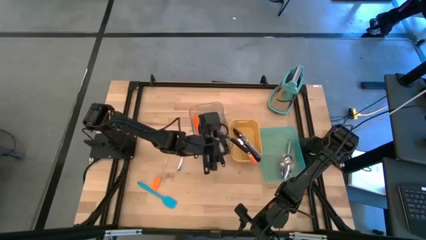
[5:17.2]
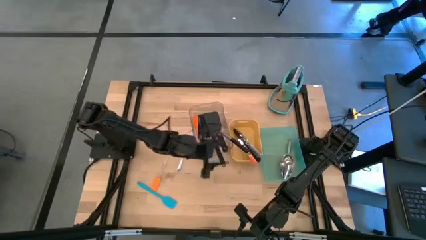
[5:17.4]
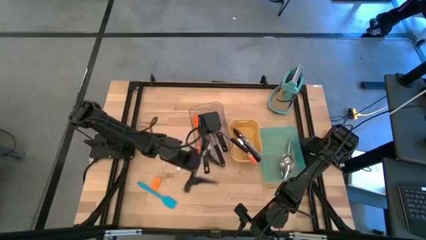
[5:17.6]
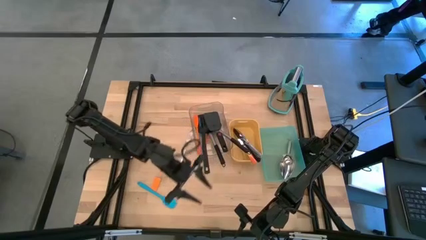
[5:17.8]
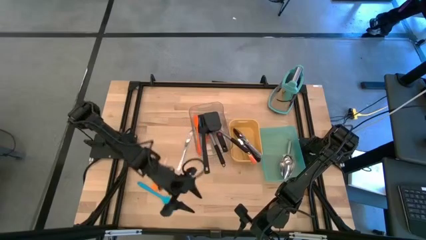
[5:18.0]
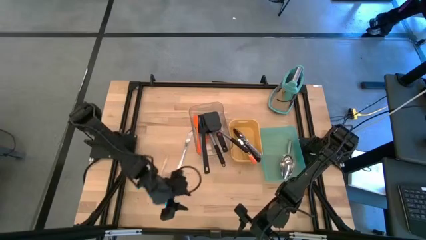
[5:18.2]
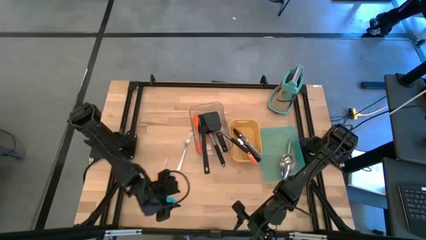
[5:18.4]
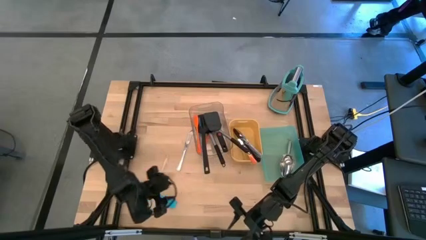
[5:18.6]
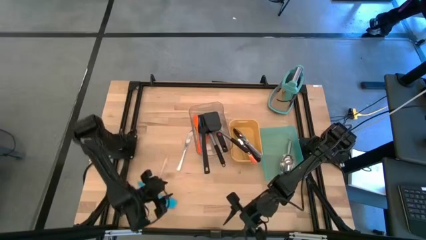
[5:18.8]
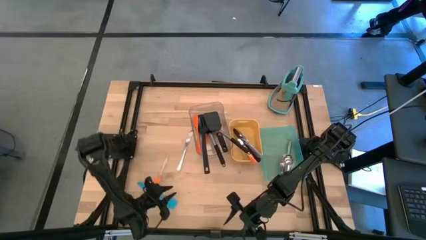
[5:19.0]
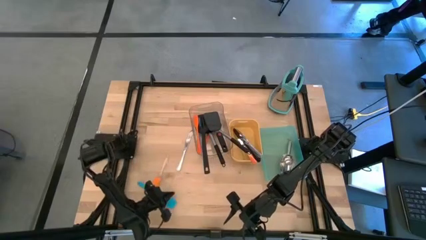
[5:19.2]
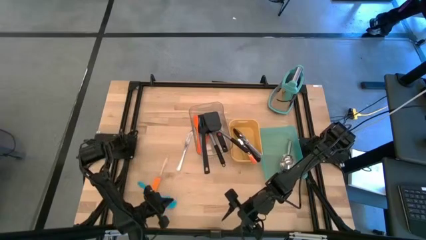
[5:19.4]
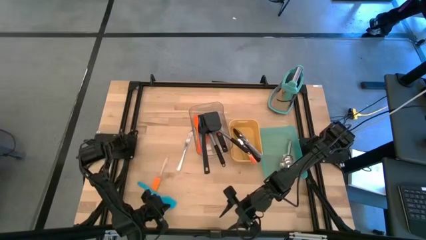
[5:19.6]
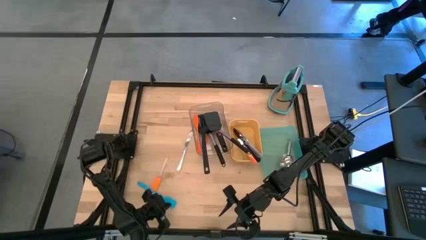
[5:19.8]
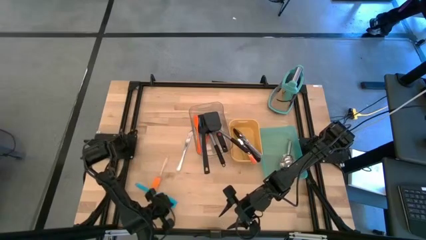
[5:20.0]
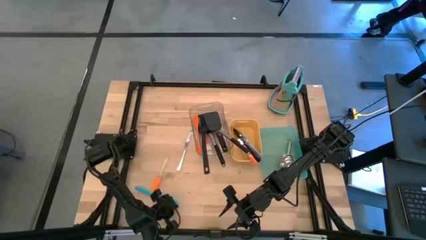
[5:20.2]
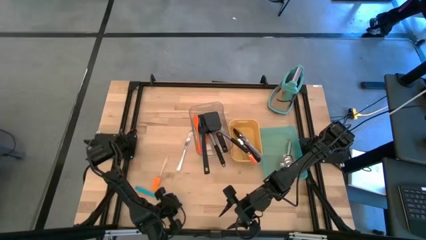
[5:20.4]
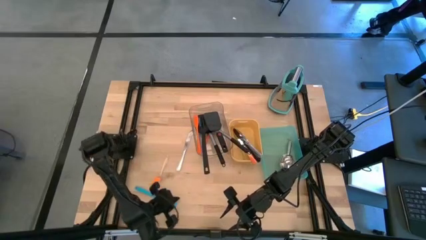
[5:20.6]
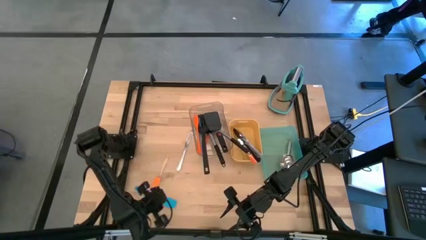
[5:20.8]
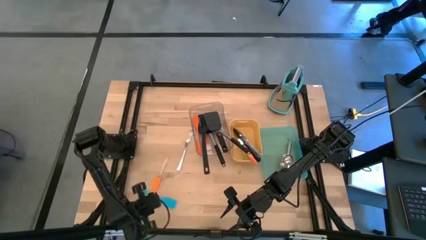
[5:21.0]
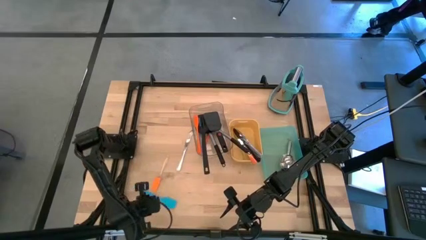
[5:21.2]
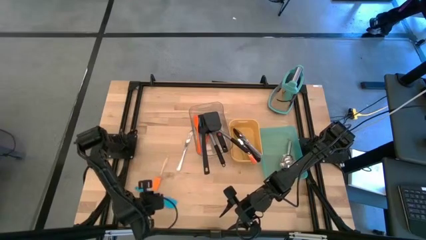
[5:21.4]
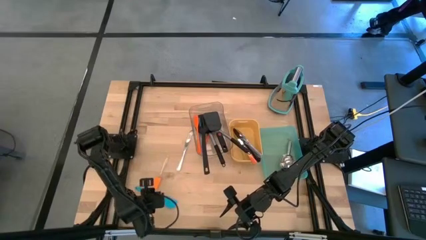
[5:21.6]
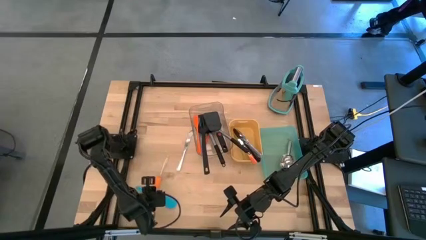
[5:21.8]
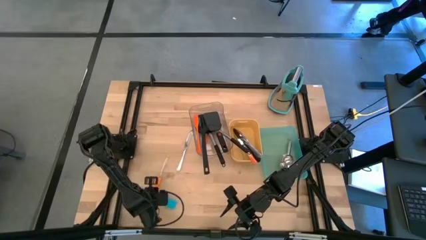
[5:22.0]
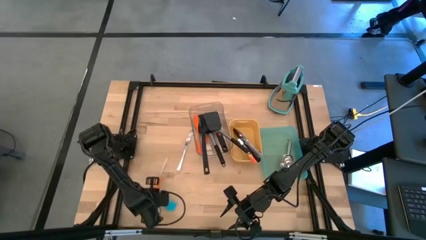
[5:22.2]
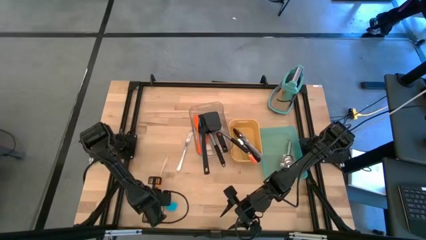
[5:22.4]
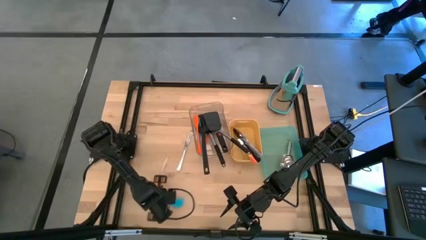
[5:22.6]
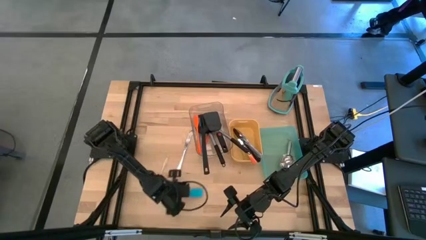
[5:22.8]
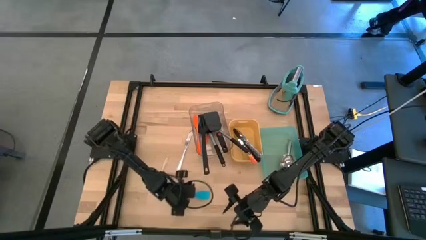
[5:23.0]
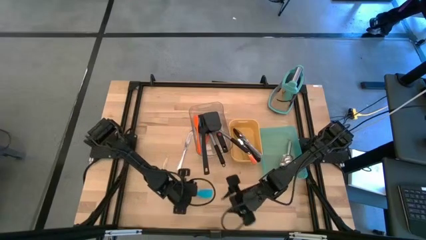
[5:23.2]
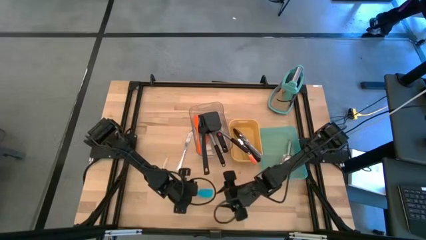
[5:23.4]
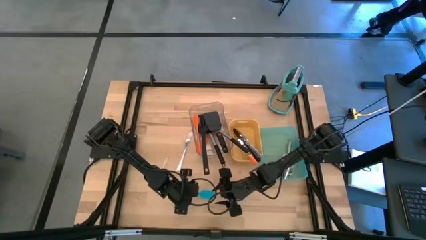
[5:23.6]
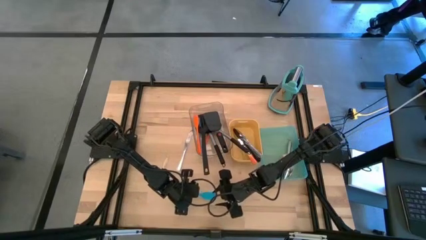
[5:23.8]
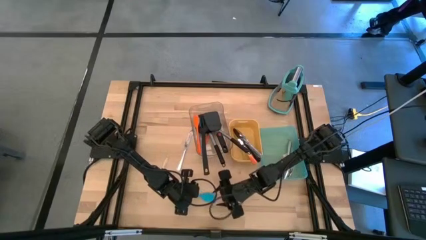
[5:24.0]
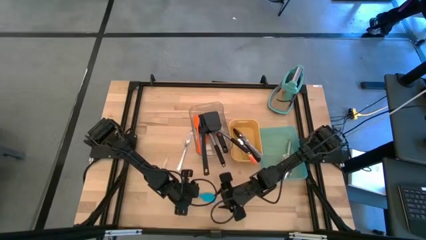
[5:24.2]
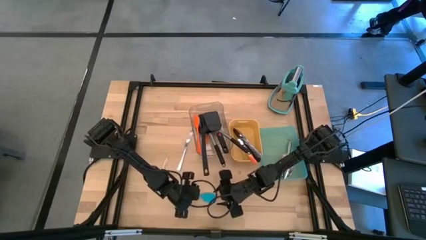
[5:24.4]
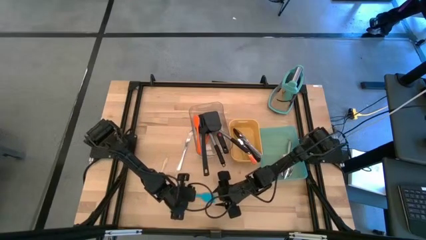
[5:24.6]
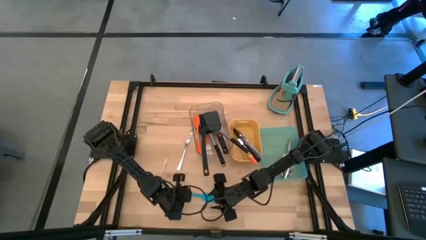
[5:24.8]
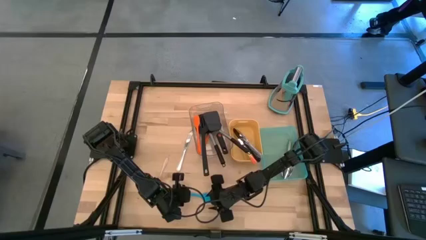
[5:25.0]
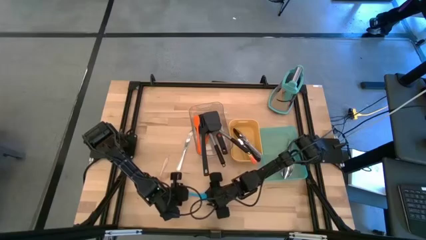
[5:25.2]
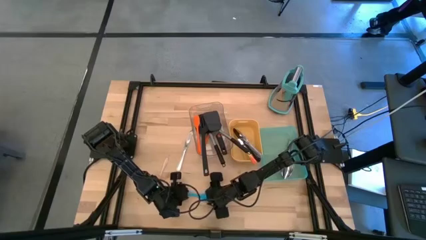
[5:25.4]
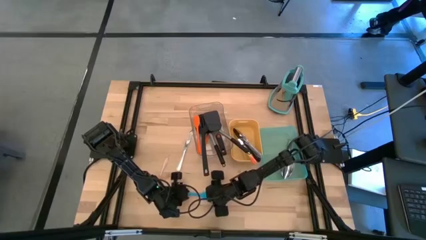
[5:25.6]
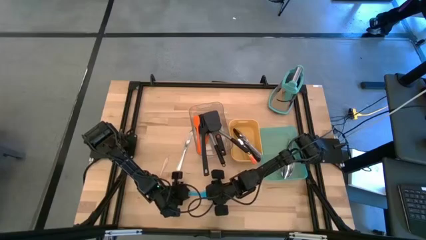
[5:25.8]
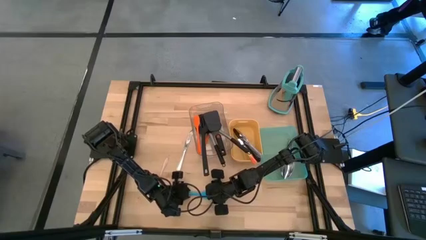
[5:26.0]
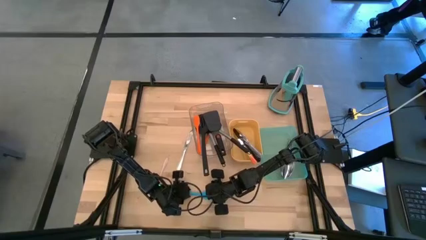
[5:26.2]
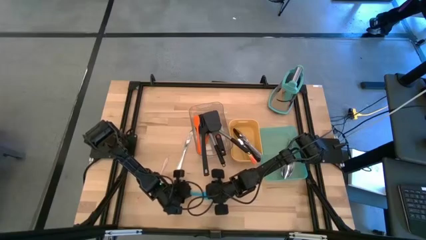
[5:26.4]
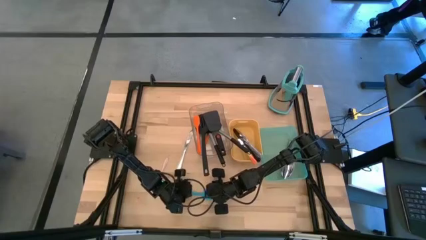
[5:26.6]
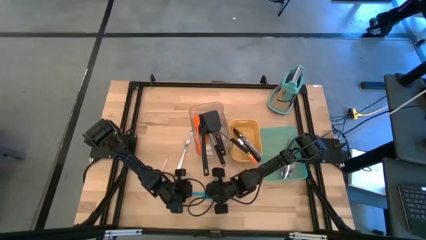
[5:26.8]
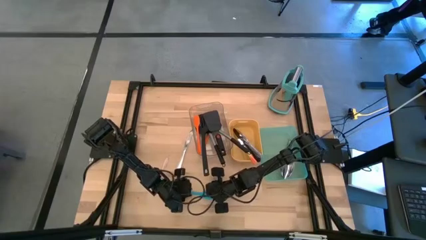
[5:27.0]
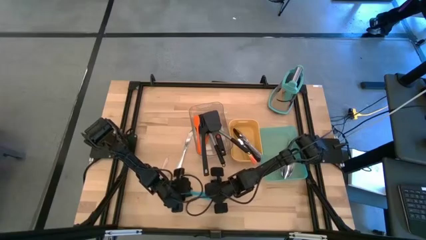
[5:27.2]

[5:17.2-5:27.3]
Task: Pick & Place Kitchen Items
Put the blue spatula into the transparent bin
